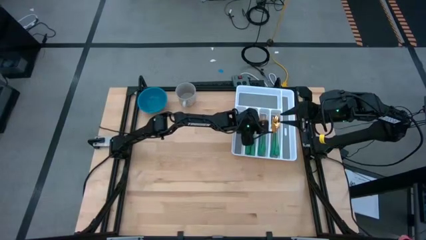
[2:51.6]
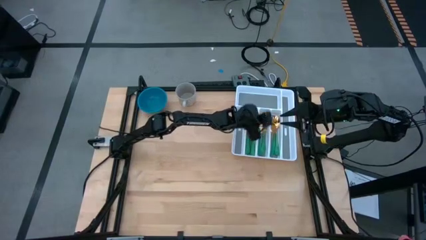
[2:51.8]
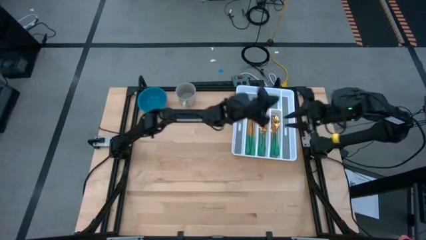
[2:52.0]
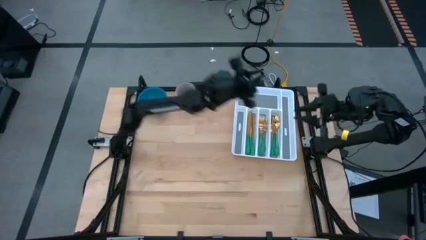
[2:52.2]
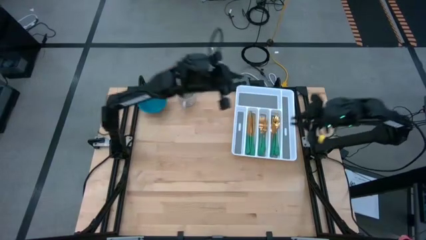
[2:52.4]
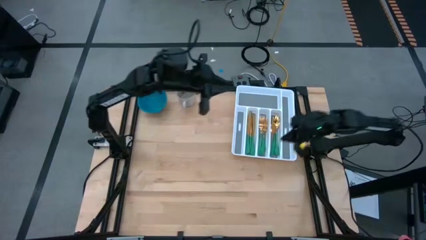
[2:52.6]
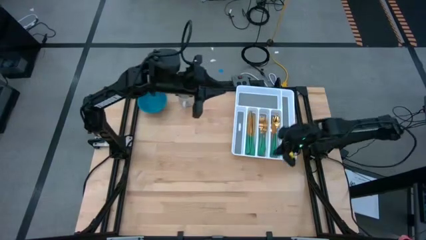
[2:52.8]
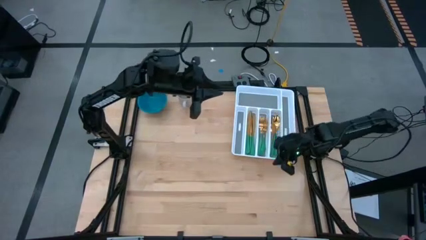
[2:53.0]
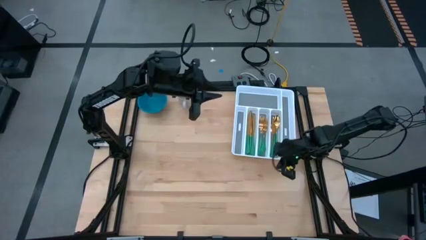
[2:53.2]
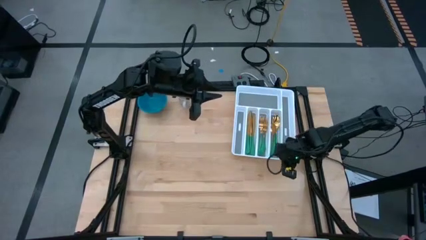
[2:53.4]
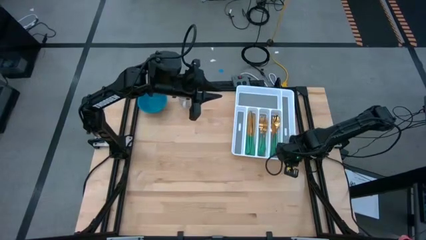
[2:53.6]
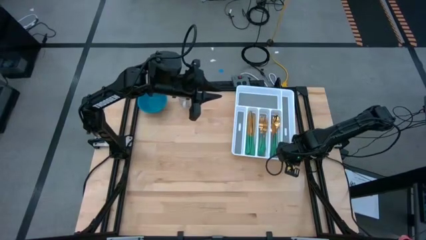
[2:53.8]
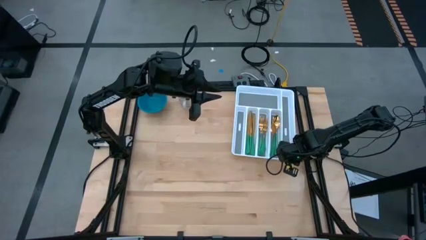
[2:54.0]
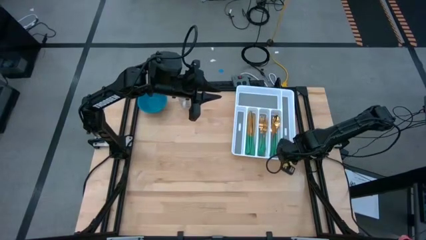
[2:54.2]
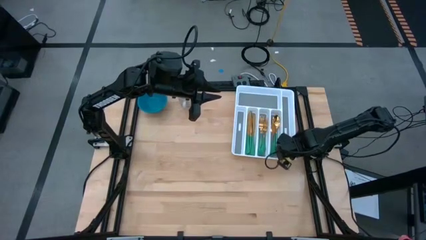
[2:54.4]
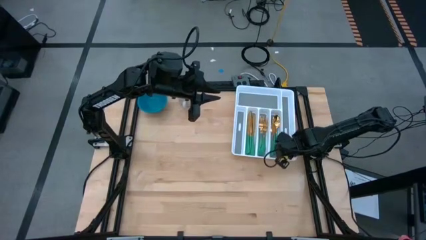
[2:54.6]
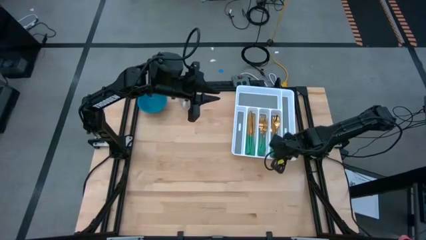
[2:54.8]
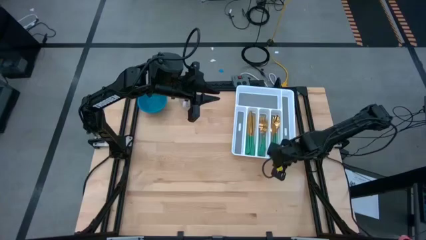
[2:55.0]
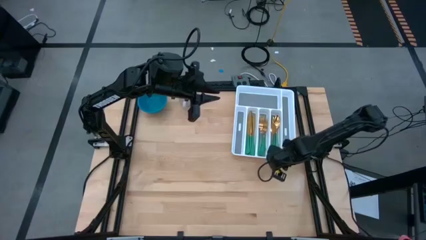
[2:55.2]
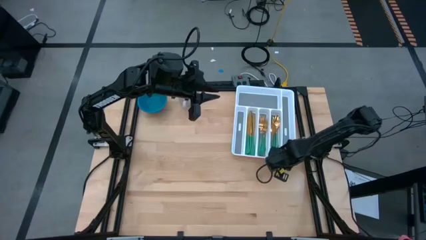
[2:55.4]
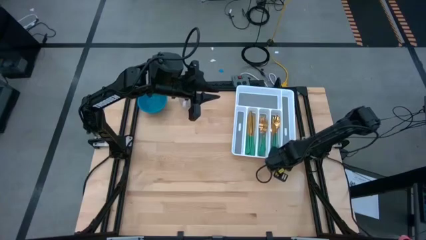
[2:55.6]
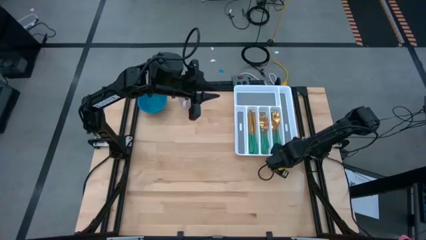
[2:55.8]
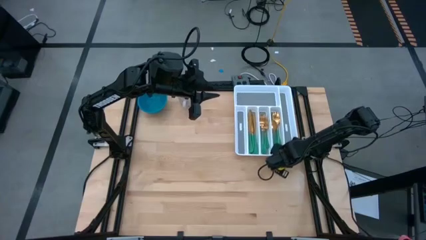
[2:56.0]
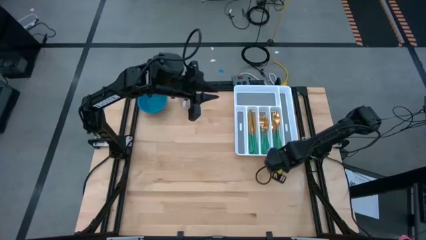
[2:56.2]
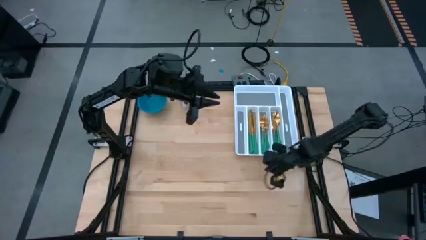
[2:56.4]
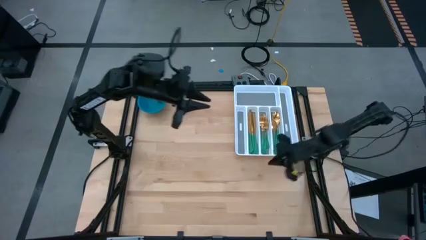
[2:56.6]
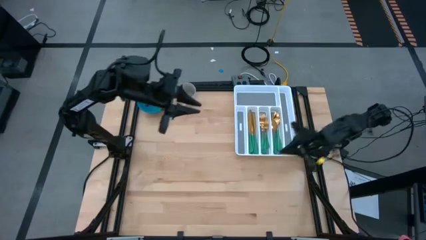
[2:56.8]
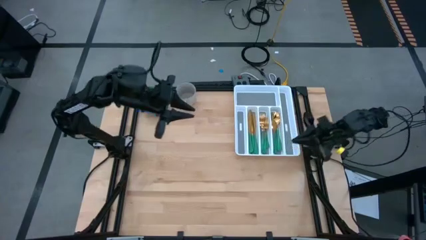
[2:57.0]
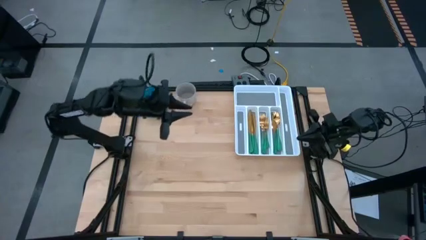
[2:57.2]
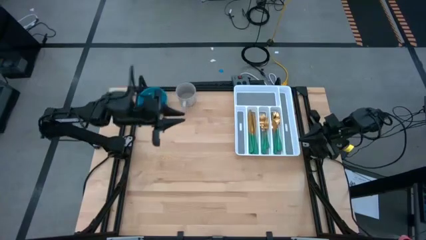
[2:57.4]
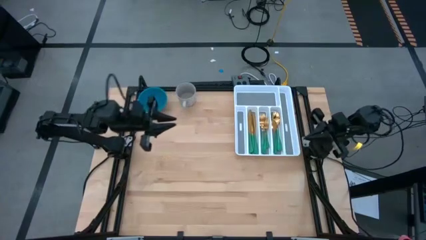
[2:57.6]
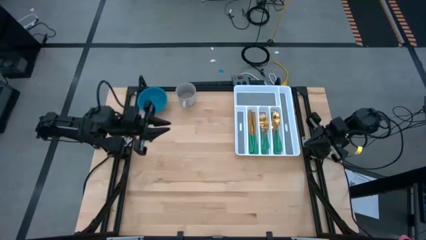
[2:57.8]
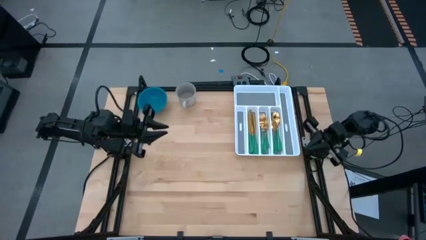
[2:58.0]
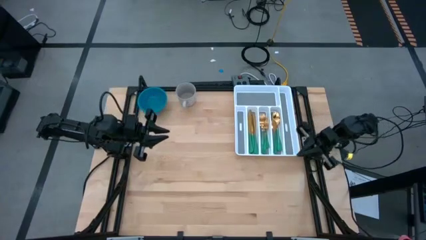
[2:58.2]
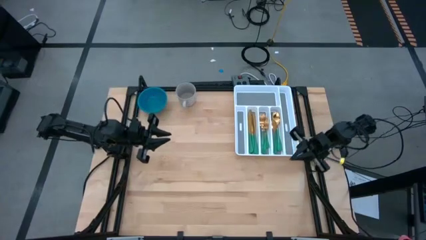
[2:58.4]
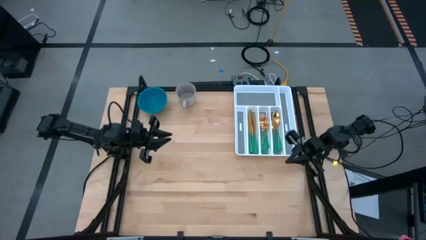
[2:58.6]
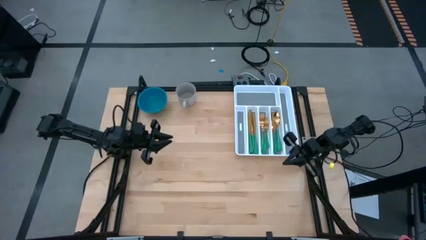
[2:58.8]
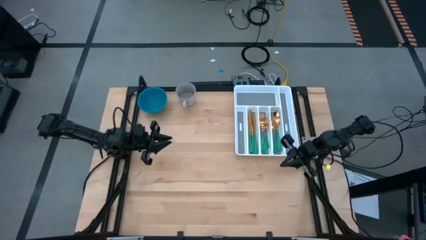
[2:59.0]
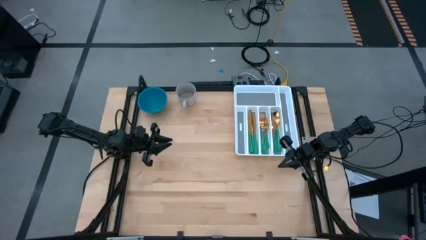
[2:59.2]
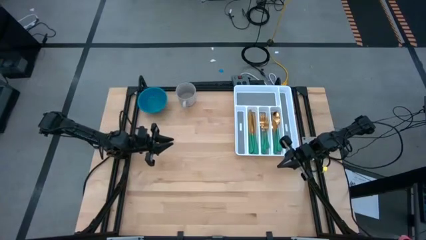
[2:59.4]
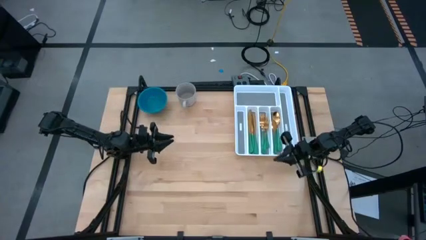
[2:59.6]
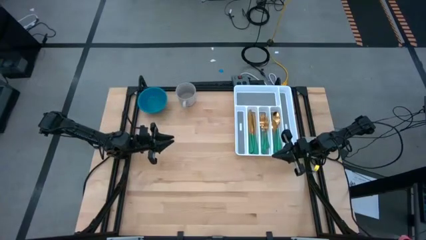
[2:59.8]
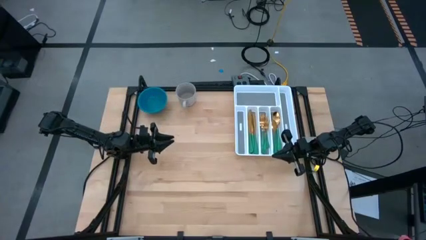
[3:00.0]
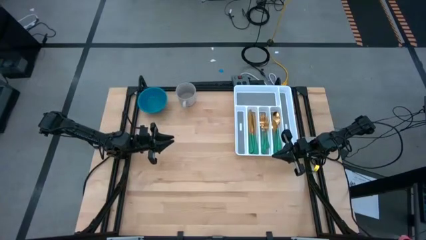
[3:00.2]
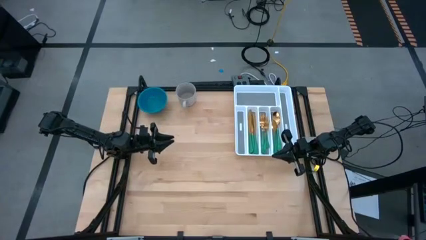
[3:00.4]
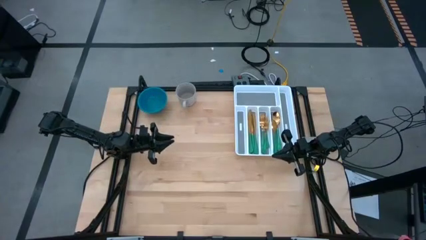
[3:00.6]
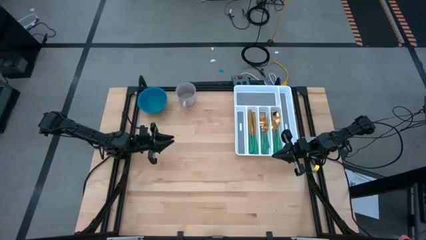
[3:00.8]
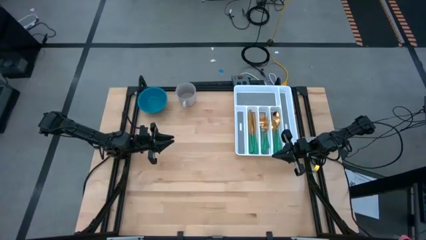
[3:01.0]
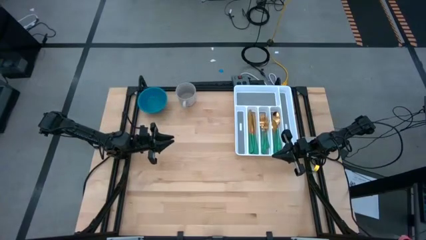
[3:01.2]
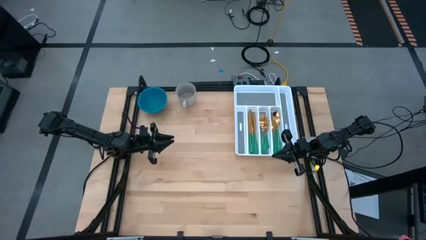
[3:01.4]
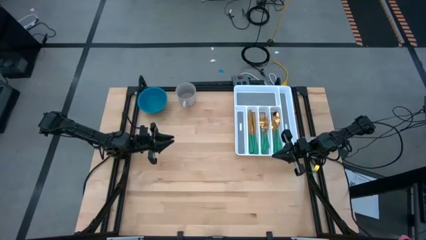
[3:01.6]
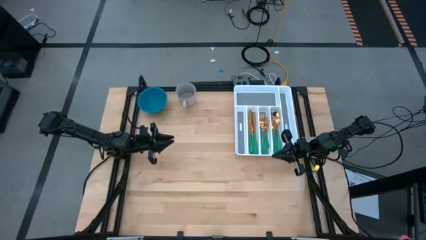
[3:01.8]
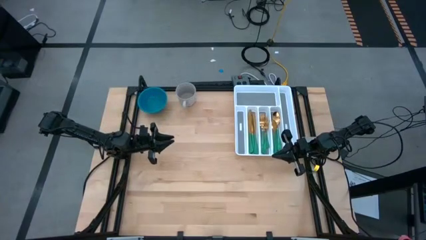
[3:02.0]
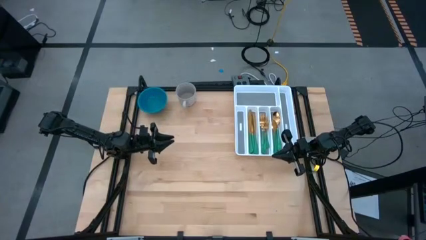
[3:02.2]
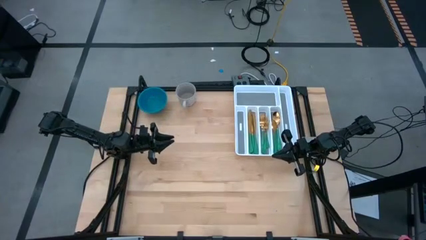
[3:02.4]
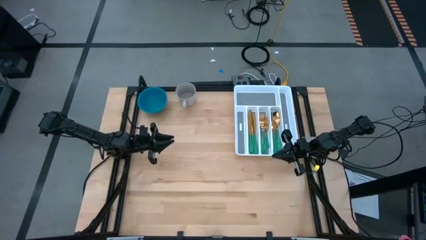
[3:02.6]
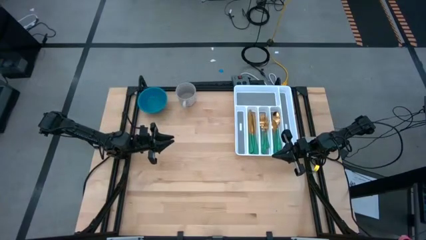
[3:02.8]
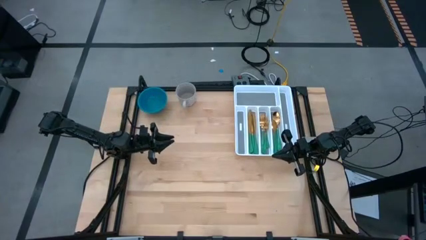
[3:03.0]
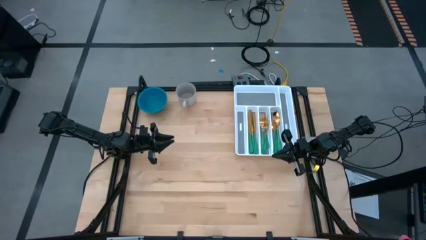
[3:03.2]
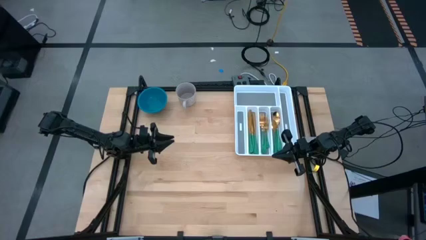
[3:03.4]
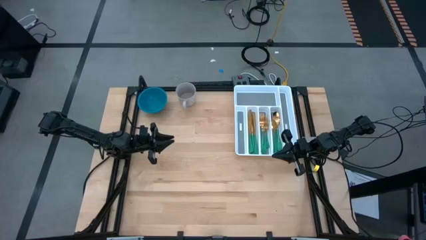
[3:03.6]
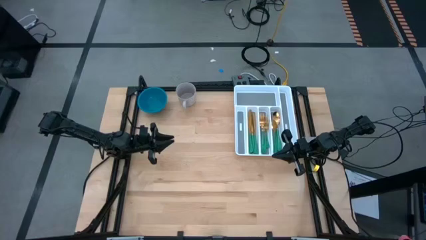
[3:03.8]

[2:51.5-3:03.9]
Task: Sort silverware
Return to Home Position
